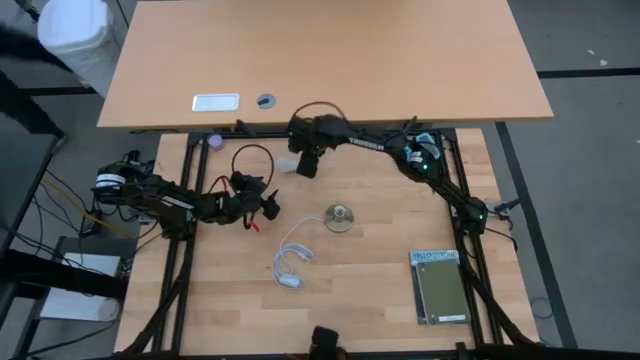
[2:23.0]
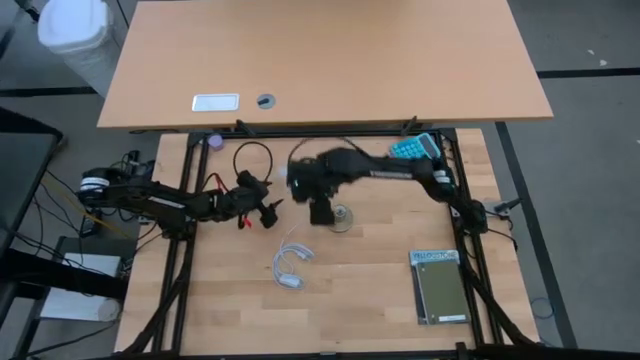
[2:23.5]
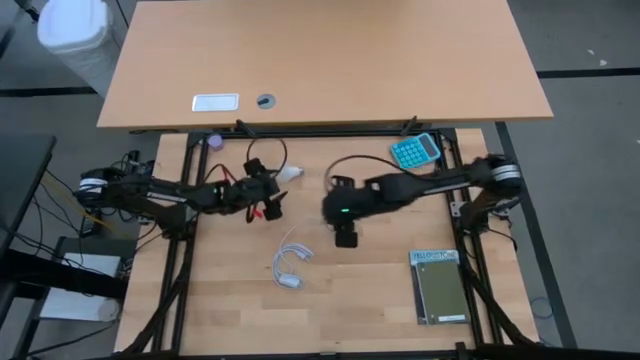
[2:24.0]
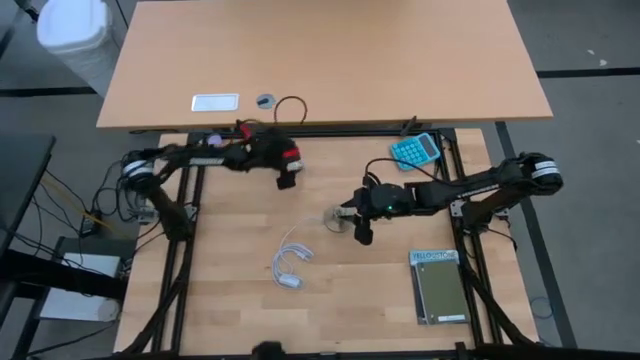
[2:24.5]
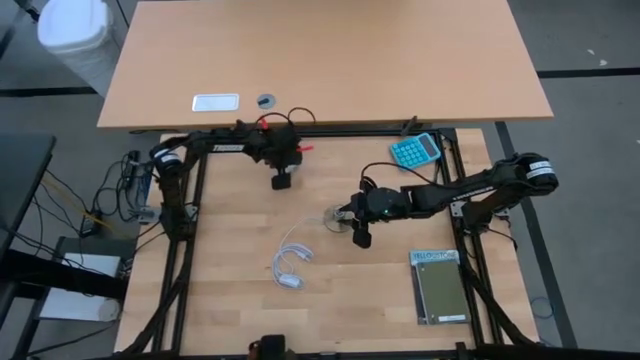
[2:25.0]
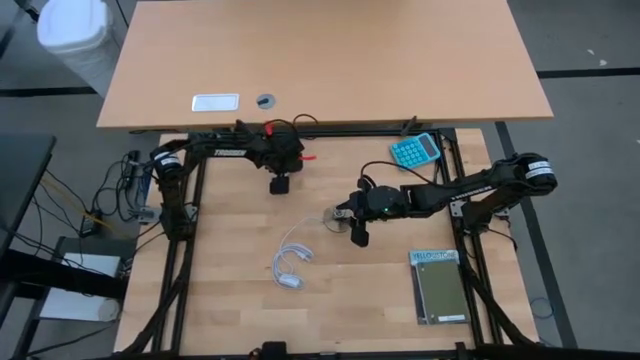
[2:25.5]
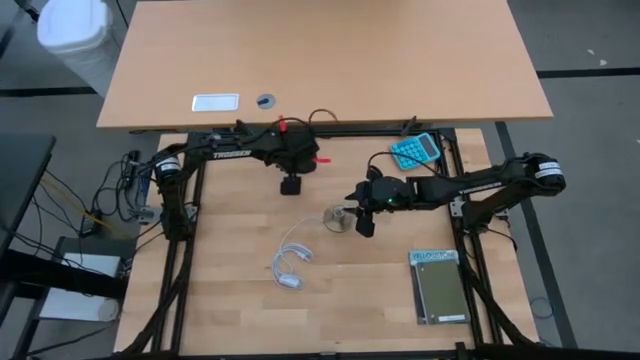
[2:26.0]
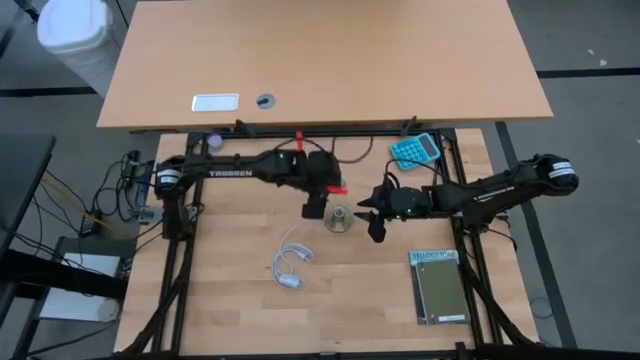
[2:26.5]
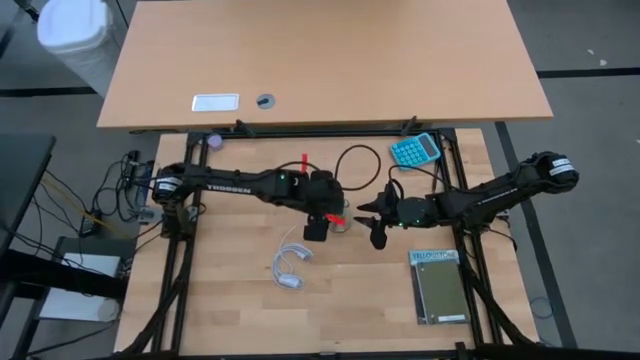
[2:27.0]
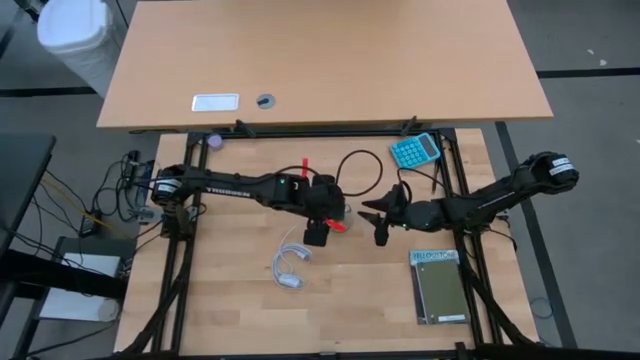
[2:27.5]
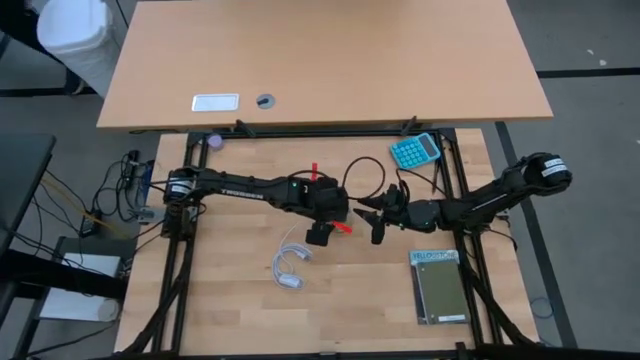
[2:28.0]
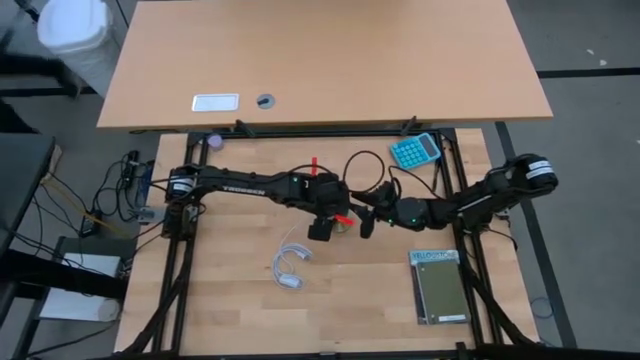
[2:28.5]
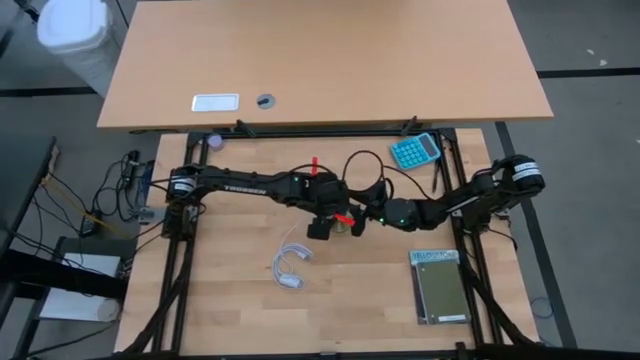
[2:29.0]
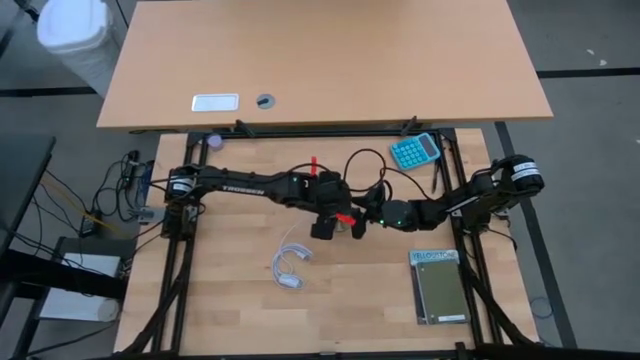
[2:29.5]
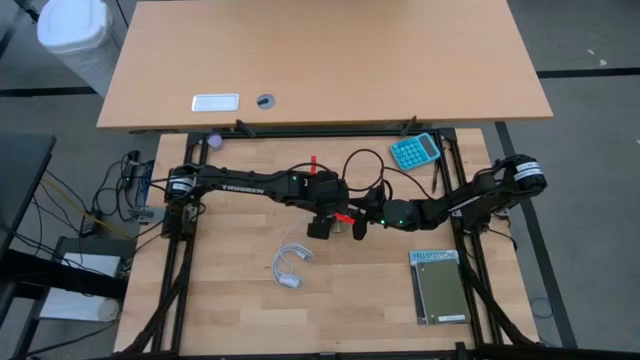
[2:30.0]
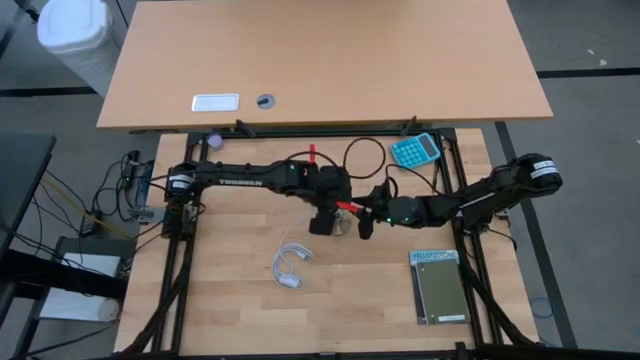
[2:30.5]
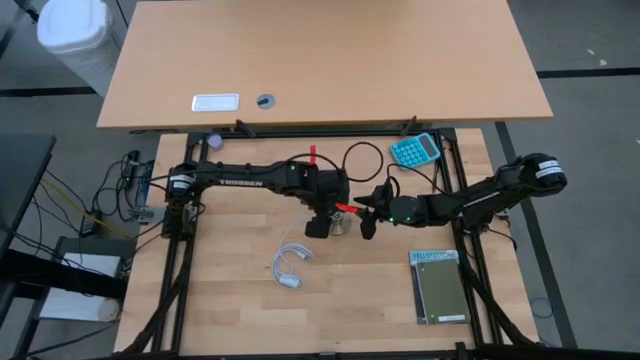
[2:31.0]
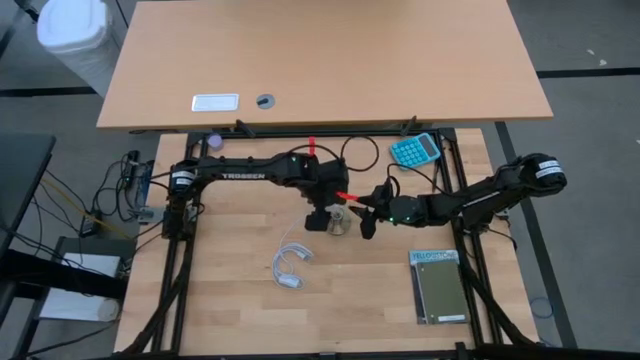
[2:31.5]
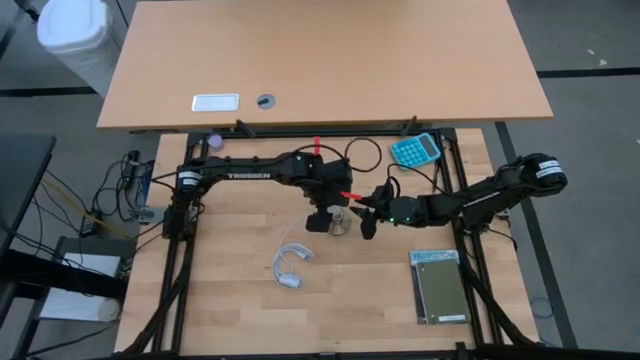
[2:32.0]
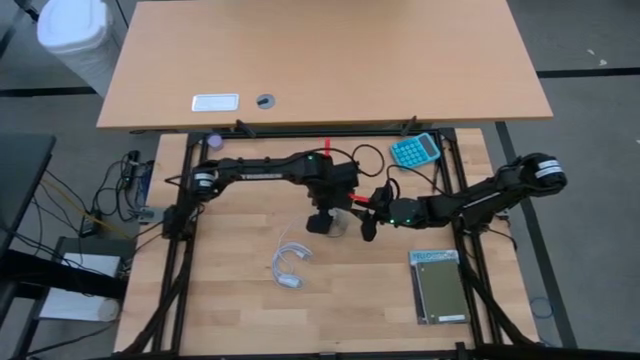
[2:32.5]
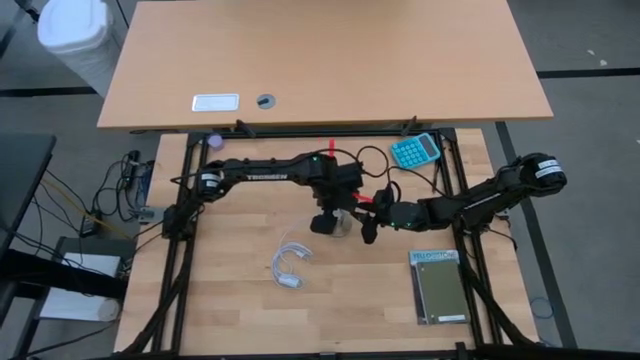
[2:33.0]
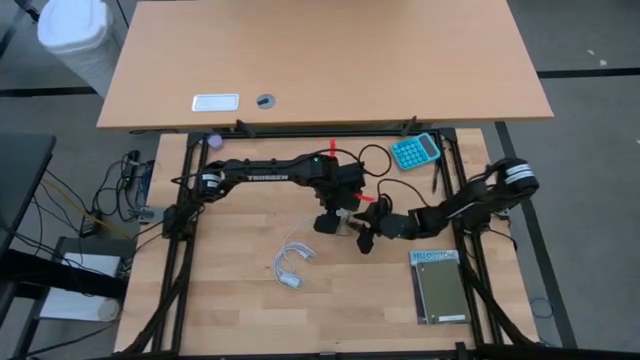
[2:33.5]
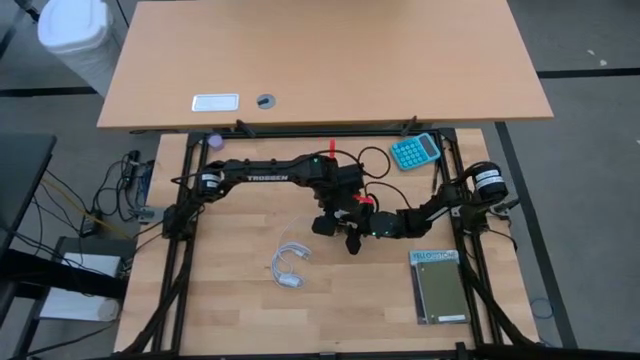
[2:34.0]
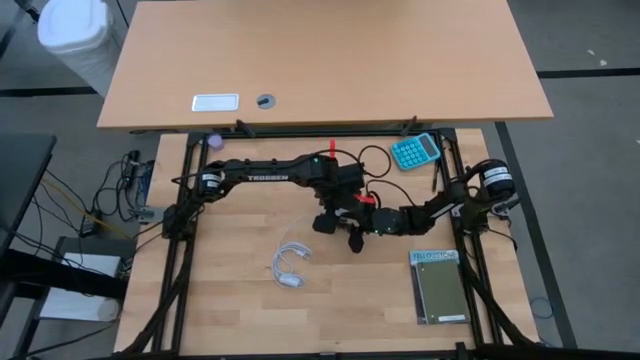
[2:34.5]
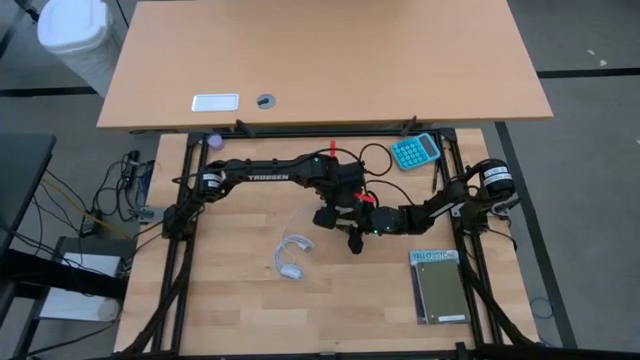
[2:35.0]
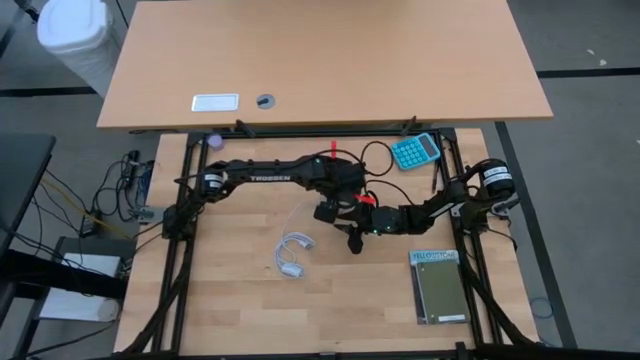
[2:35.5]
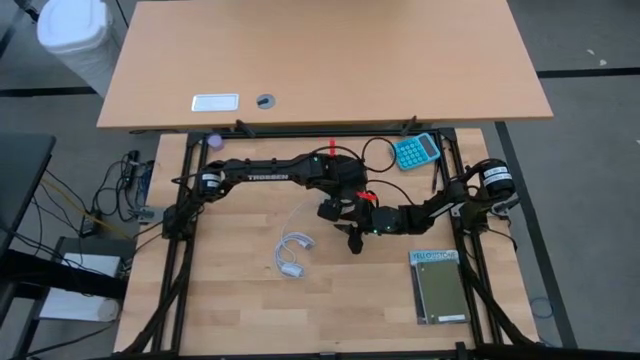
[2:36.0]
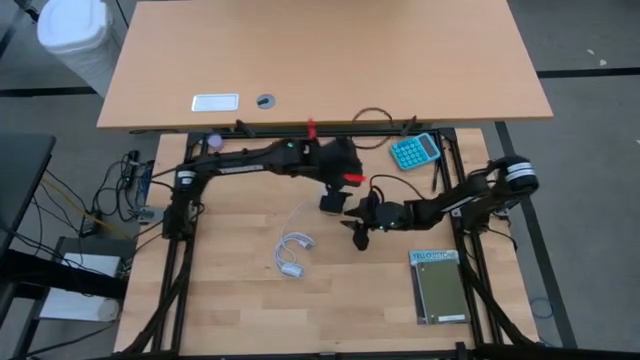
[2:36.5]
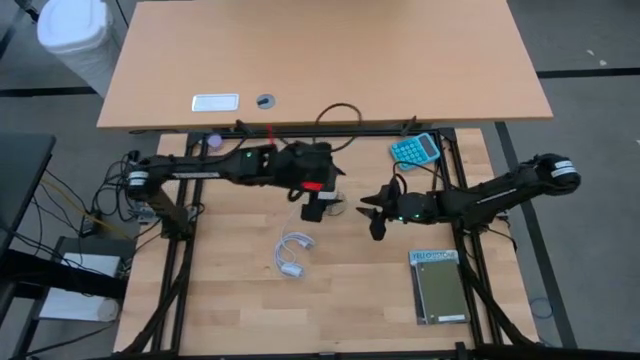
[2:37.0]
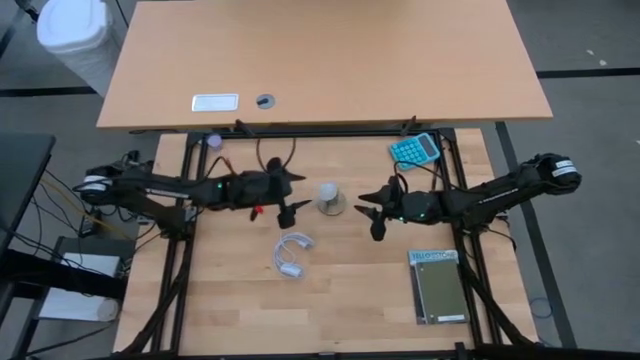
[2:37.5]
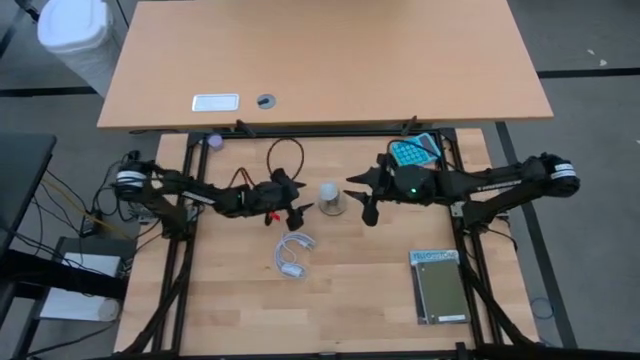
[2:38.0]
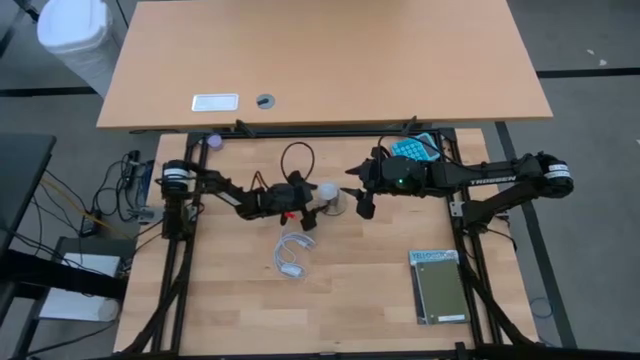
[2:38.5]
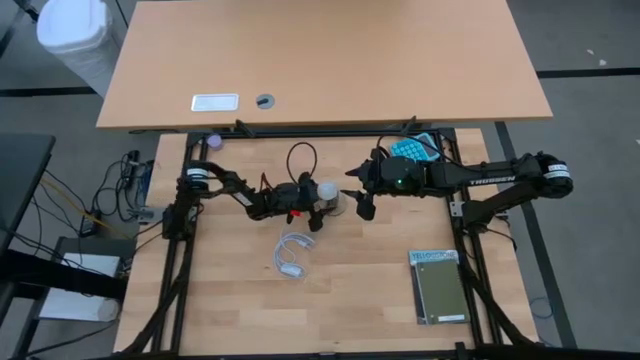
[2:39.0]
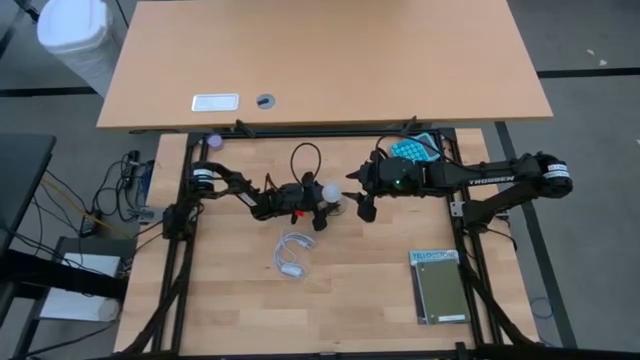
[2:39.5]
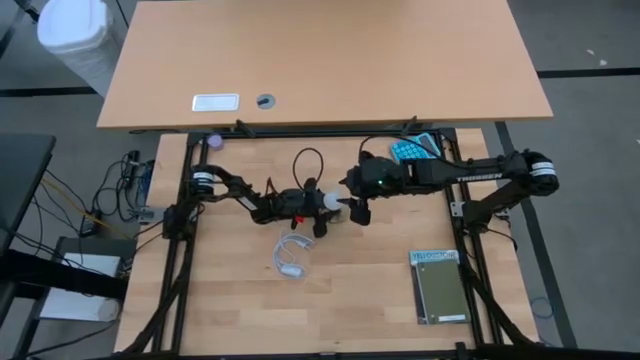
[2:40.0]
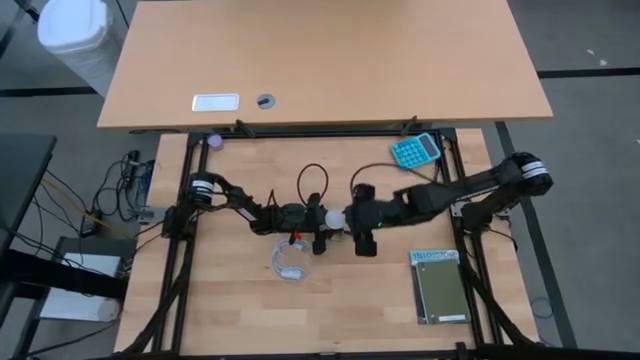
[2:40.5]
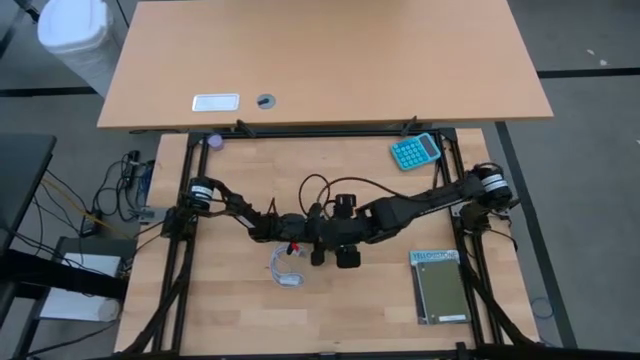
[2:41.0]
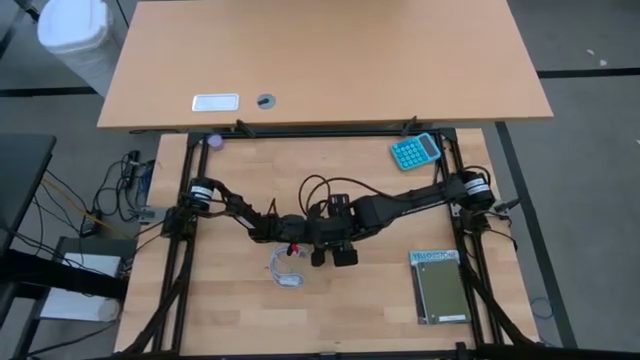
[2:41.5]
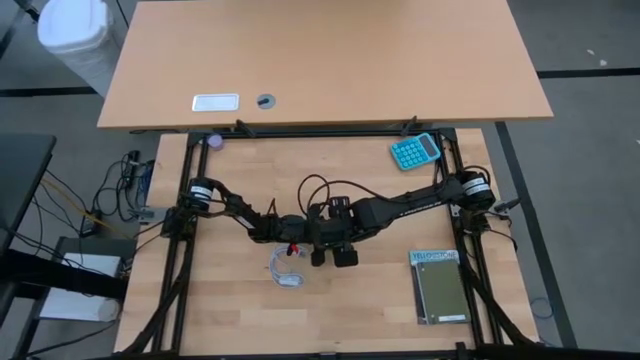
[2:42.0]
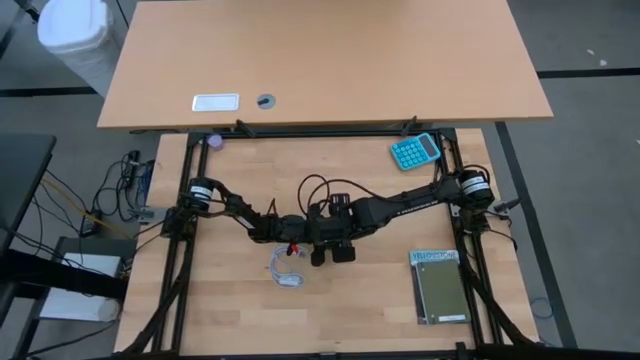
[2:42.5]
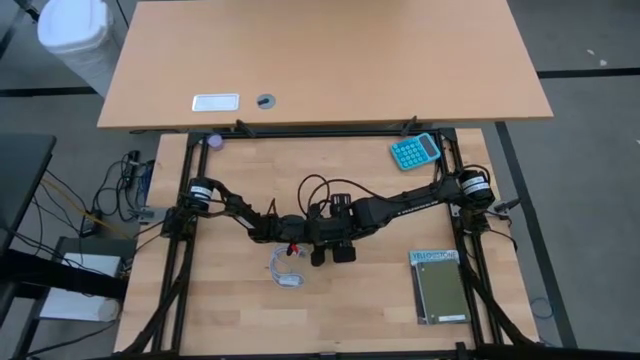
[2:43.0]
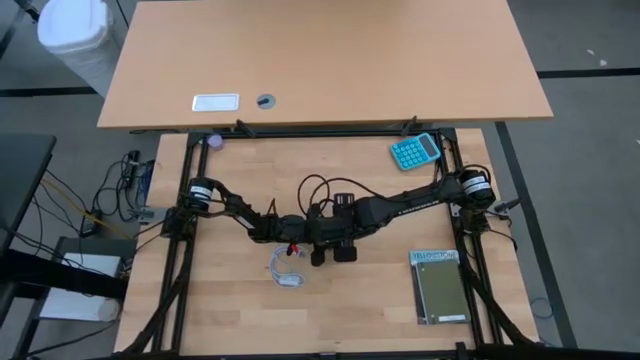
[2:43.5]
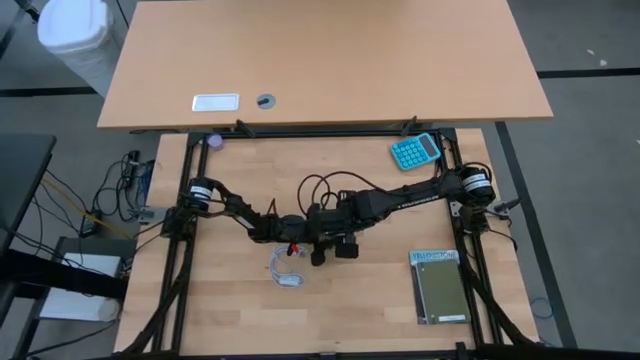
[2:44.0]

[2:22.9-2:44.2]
Task: Screw lightbulb
Insert the lightbulb into the socket
